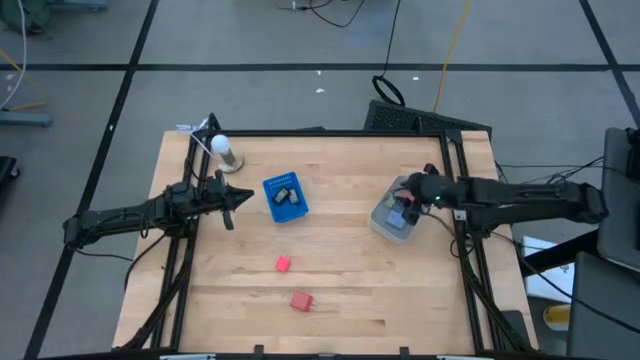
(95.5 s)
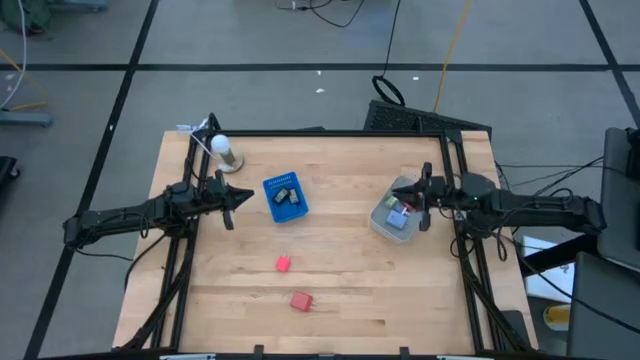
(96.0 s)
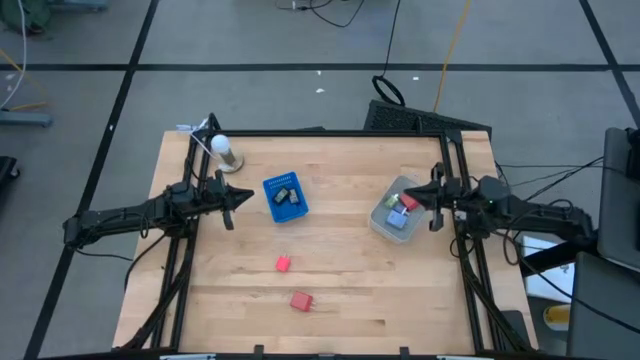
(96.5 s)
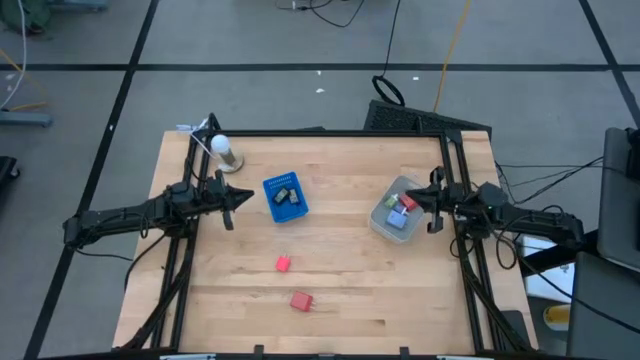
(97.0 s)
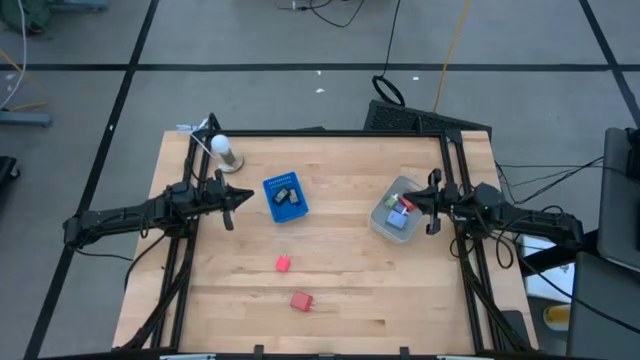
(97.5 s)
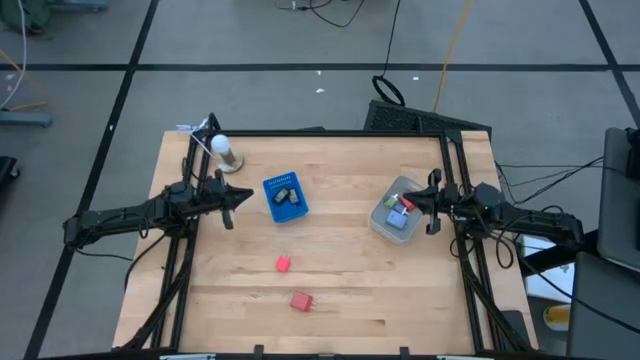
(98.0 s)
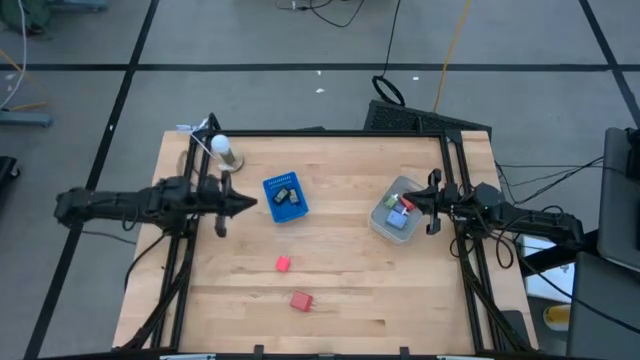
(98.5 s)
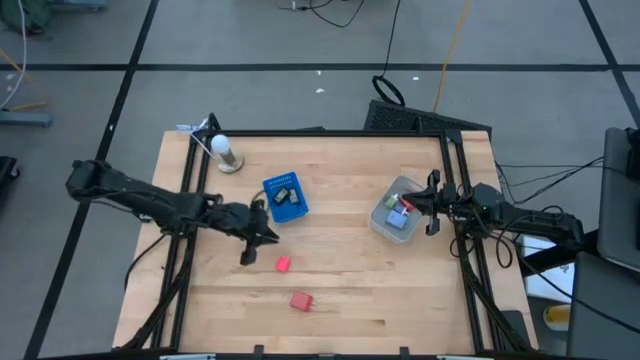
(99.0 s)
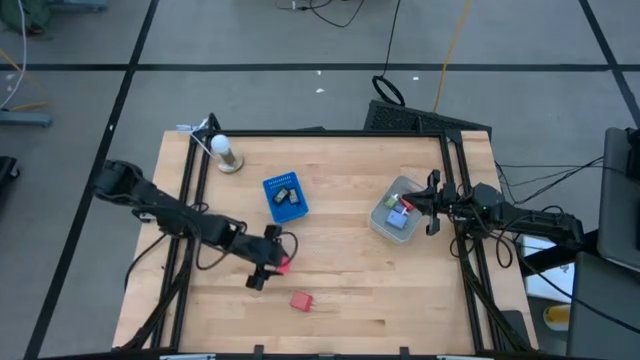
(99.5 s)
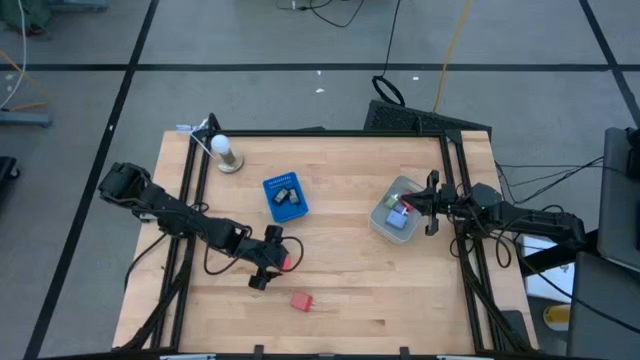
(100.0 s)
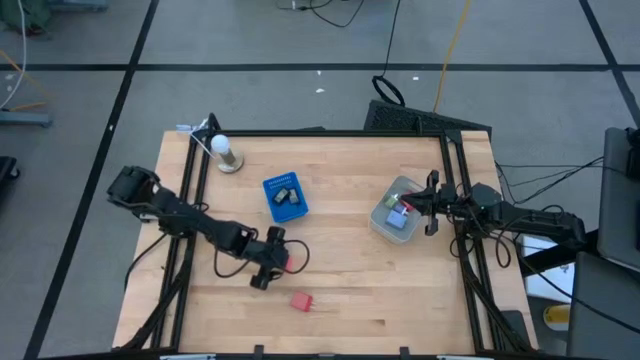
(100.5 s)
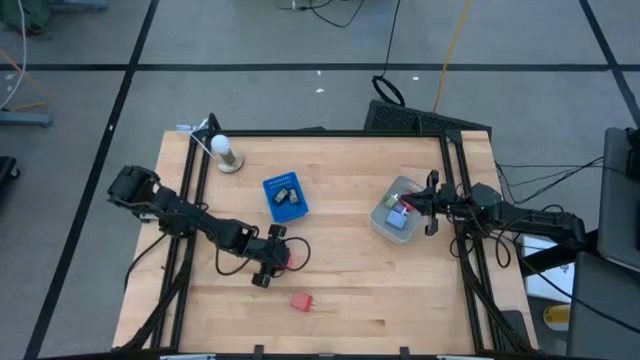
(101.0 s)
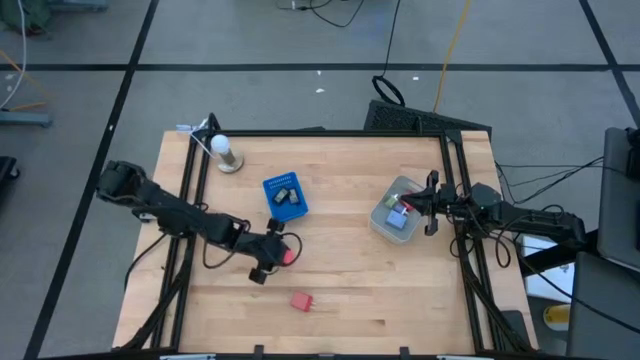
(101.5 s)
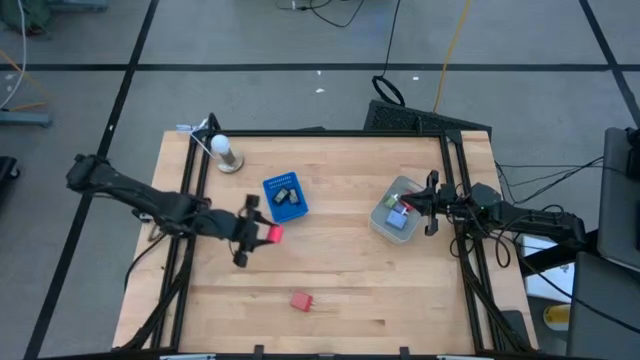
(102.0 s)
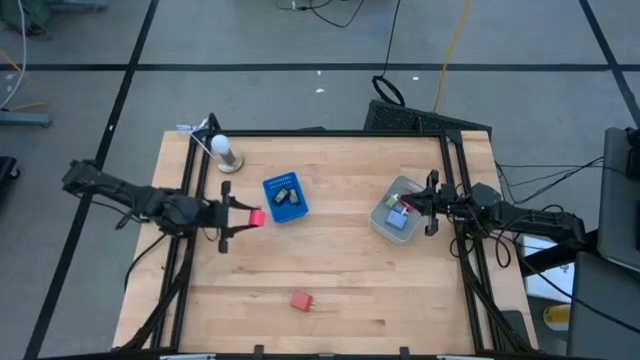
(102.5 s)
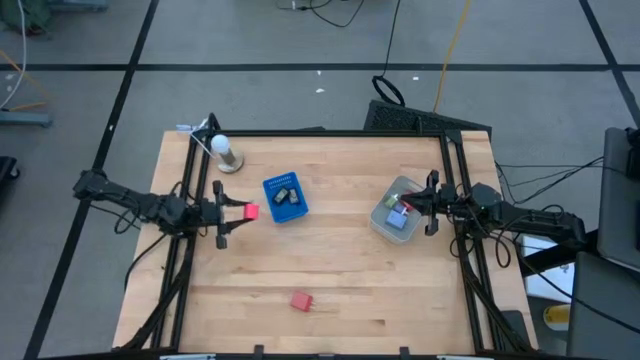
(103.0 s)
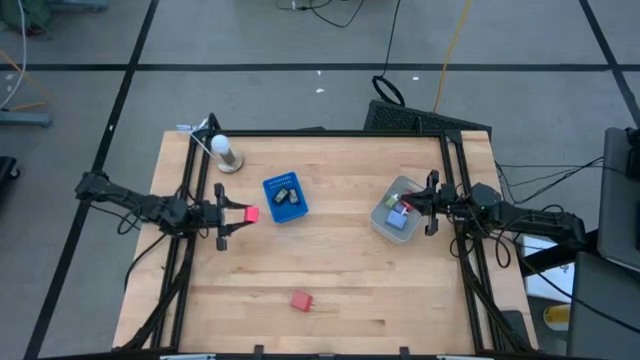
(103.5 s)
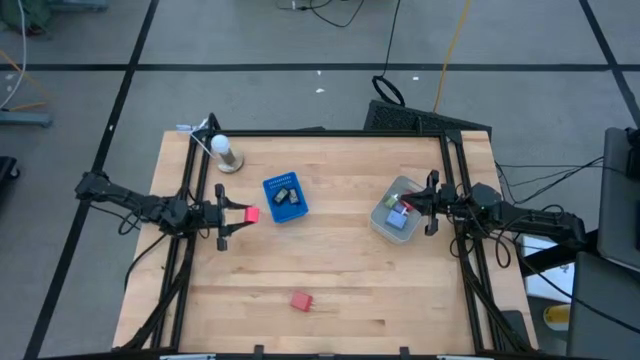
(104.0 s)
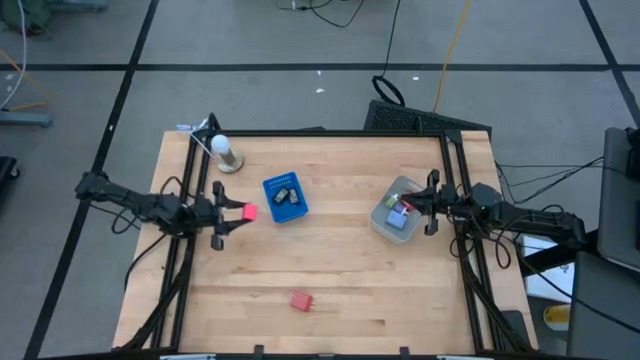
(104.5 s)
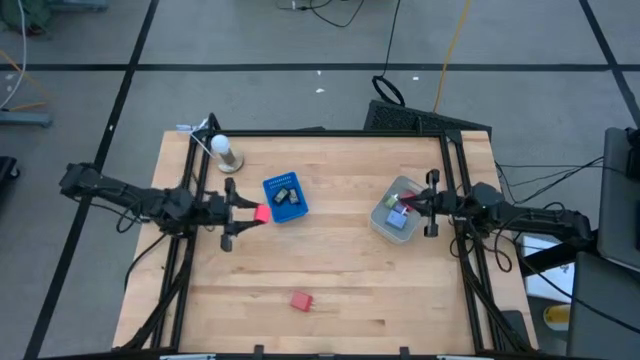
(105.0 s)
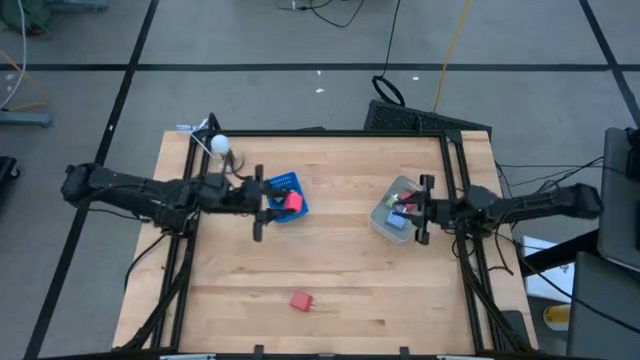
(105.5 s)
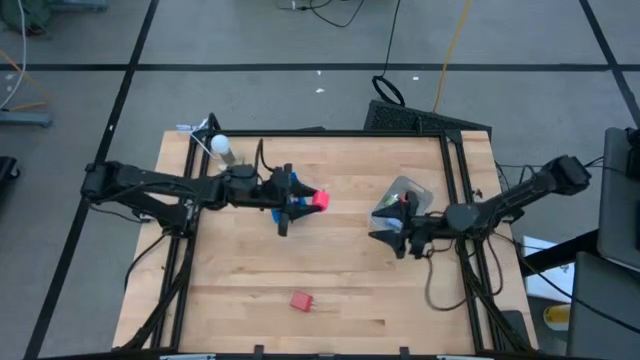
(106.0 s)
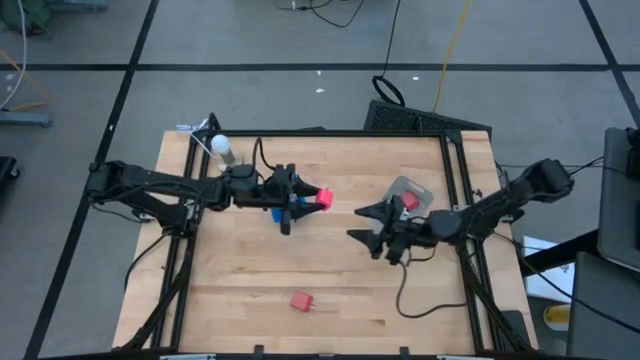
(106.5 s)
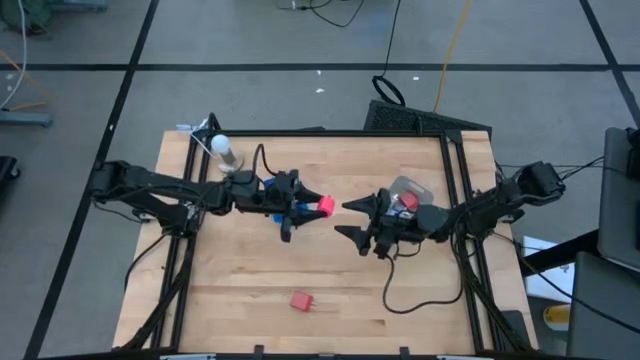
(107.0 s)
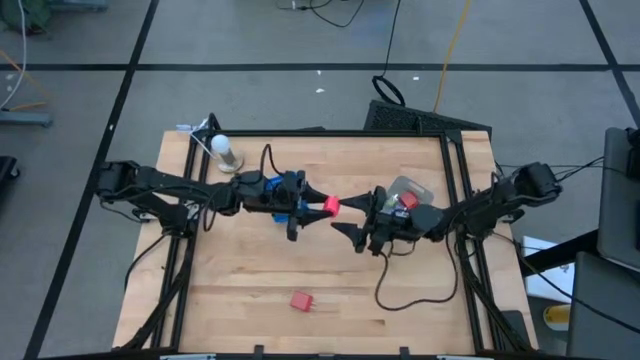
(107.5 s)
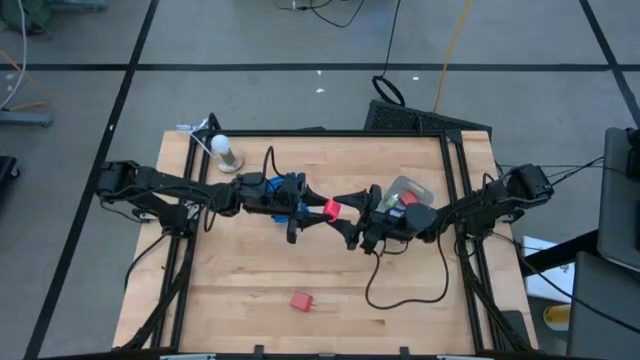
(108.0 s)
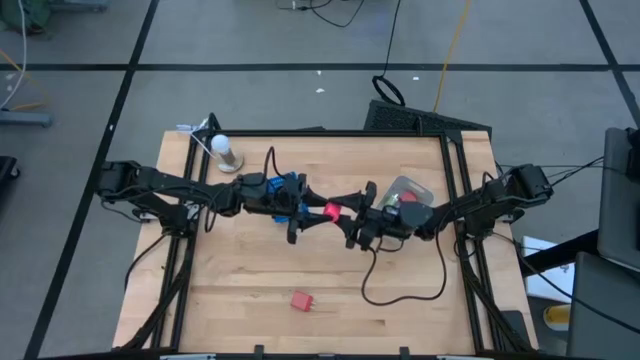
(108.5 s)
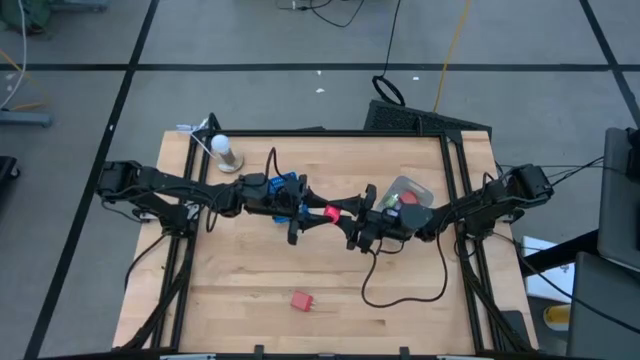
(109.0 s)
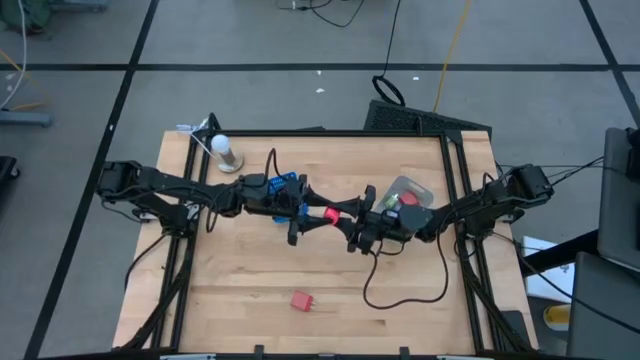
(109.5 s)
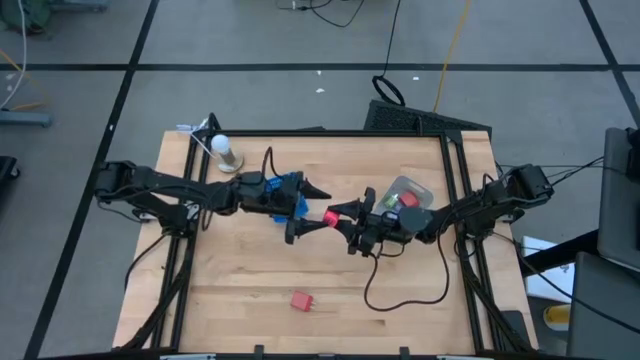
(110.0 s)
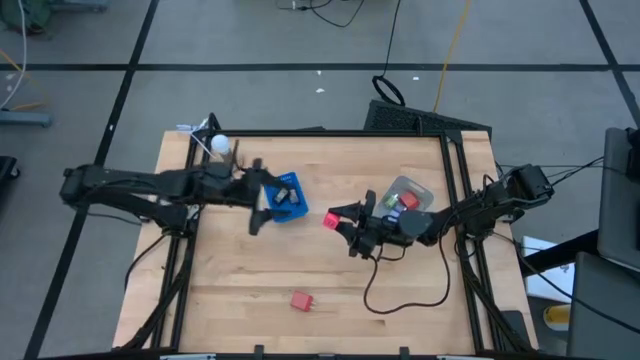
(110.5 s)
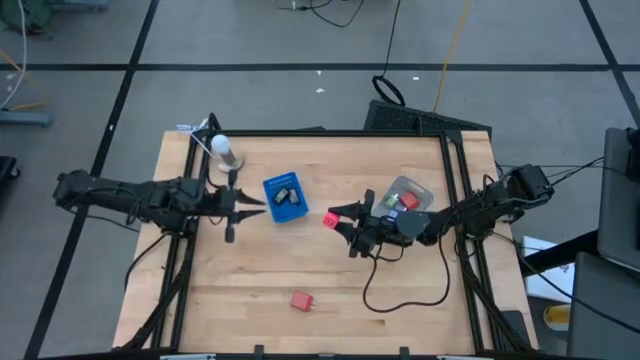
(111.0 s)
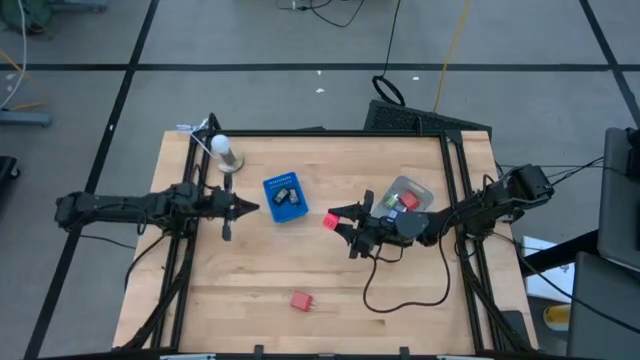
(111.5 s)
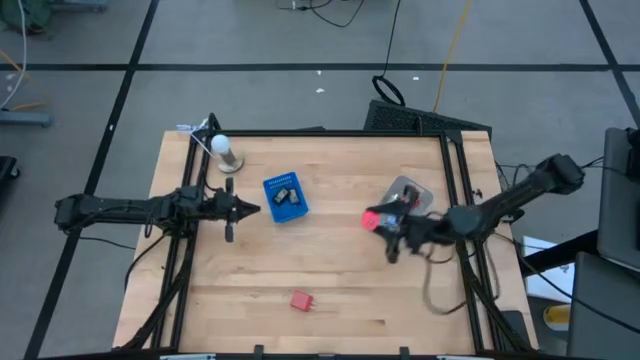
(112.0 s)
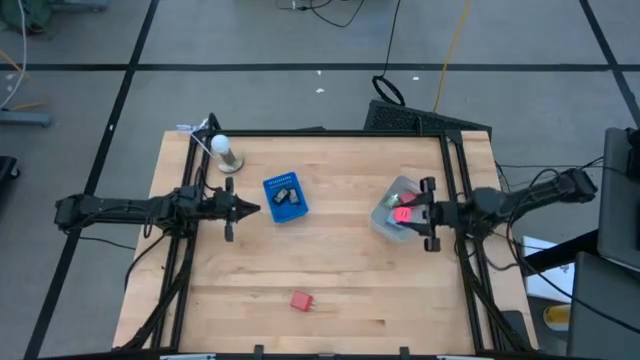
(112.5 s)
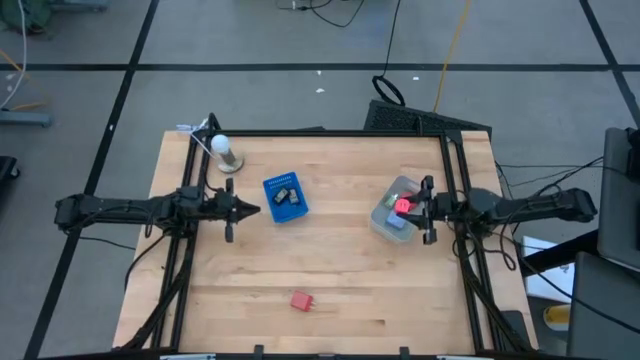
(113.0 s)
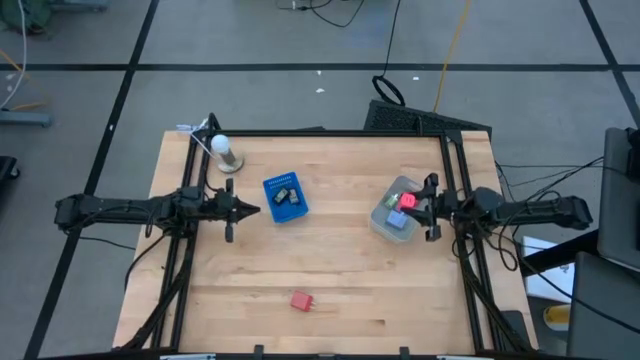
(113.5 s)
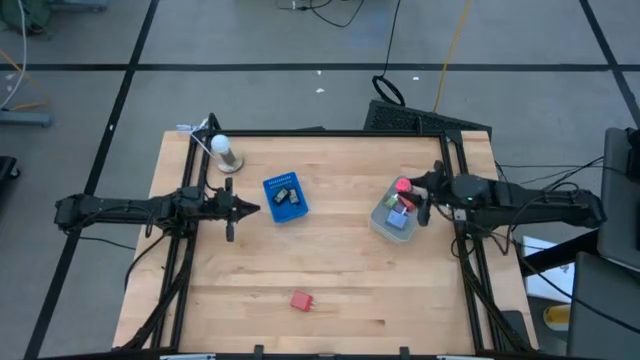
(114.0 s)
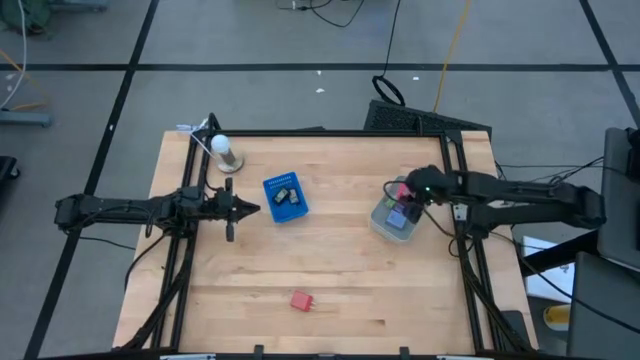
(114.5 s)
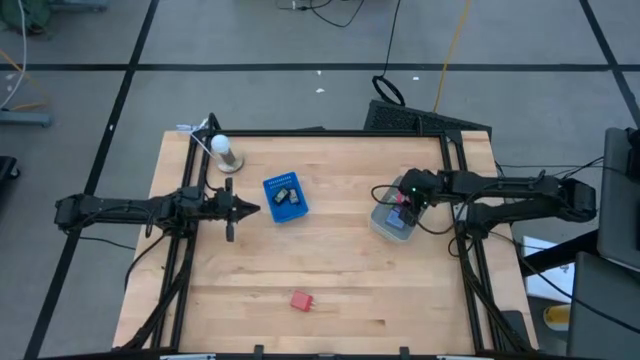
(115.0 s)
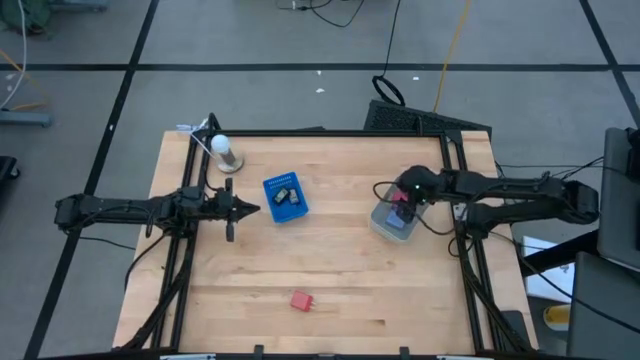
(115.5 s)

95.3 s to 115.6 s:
Task: Pick & Place Office items
Put the pink charger adapter into the gray bin
